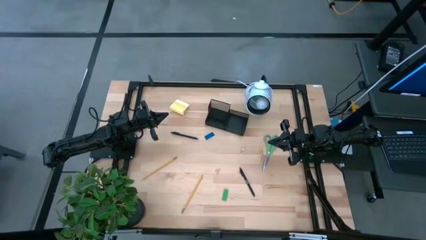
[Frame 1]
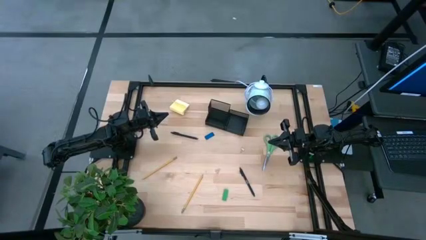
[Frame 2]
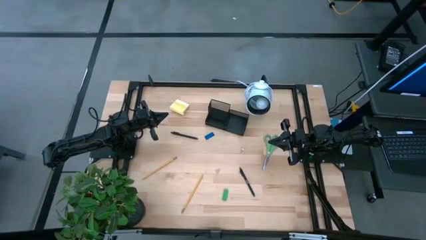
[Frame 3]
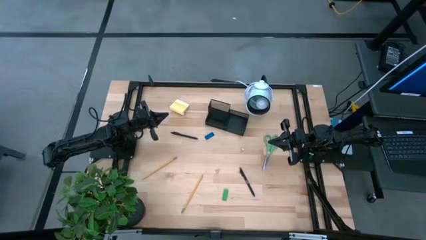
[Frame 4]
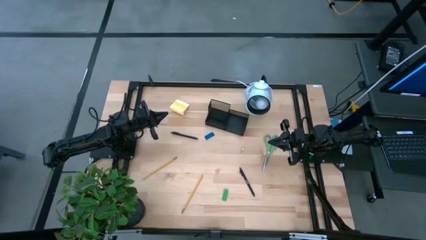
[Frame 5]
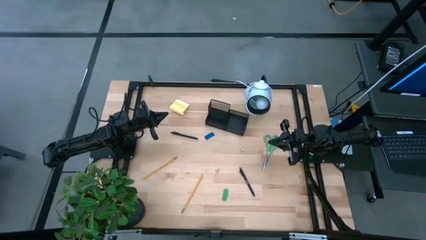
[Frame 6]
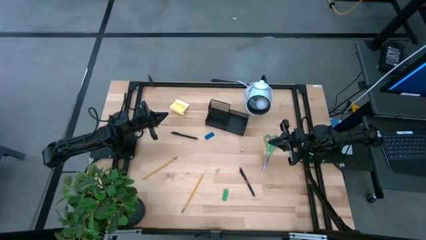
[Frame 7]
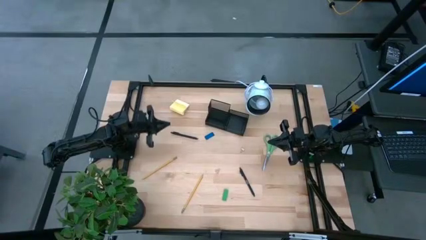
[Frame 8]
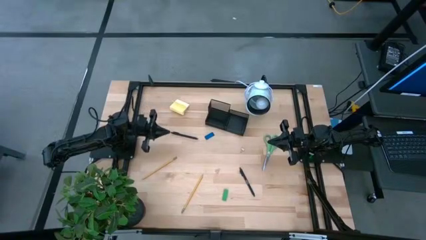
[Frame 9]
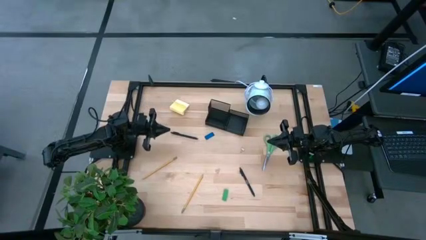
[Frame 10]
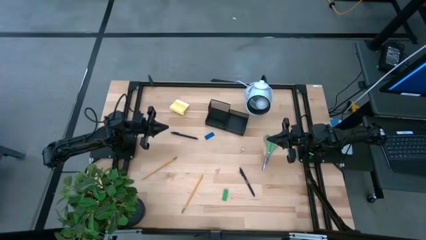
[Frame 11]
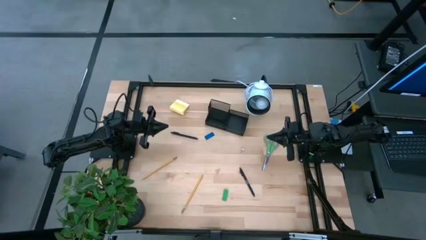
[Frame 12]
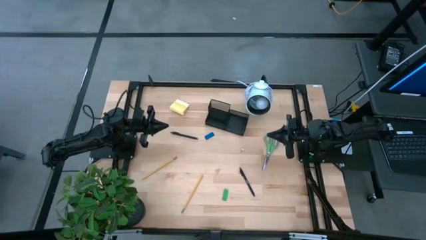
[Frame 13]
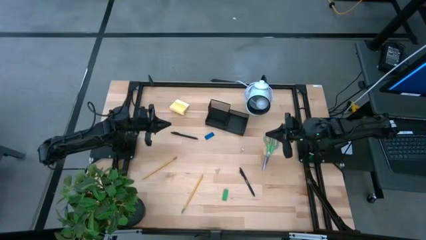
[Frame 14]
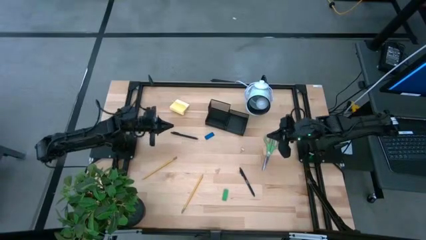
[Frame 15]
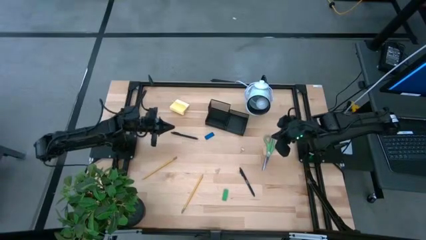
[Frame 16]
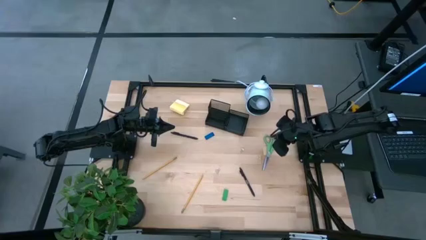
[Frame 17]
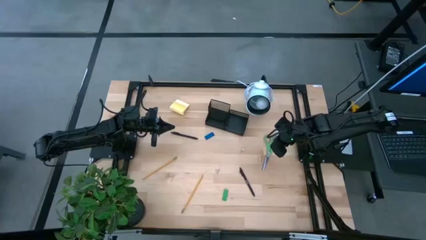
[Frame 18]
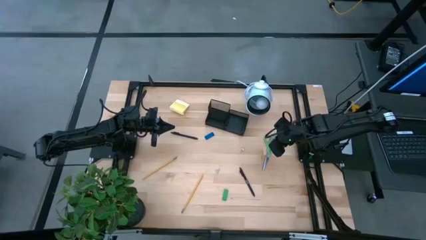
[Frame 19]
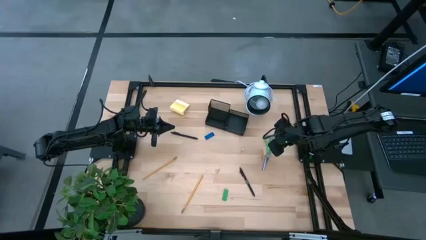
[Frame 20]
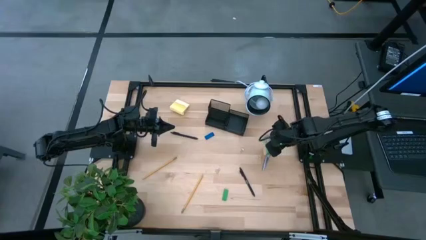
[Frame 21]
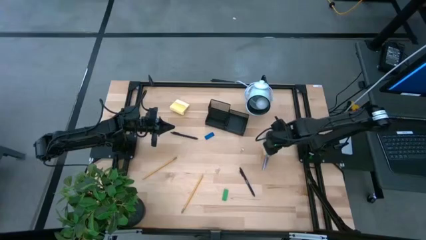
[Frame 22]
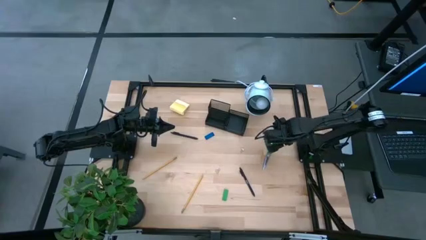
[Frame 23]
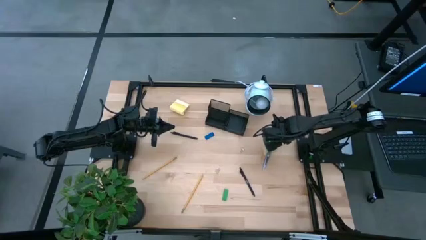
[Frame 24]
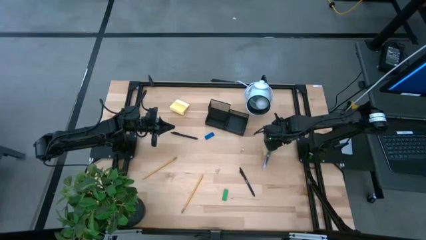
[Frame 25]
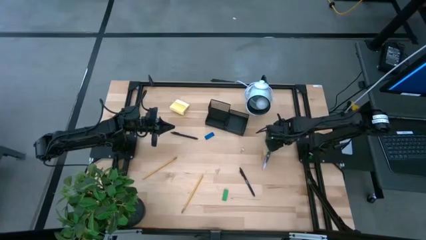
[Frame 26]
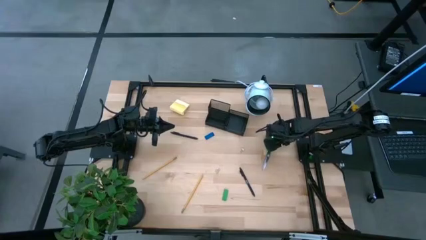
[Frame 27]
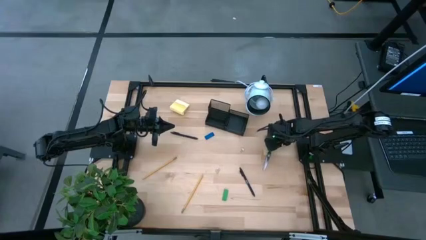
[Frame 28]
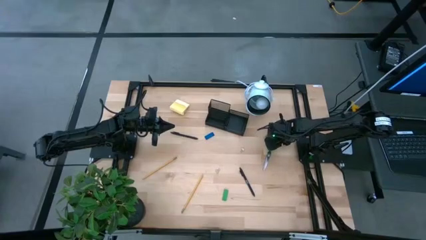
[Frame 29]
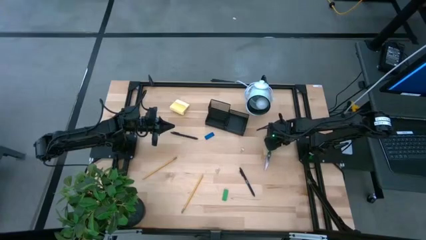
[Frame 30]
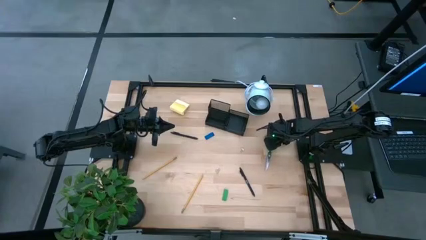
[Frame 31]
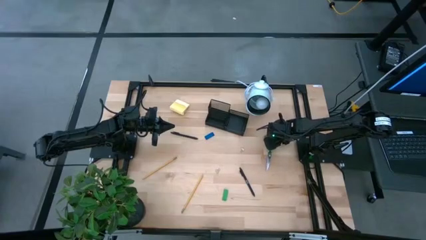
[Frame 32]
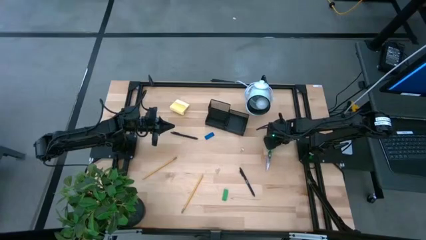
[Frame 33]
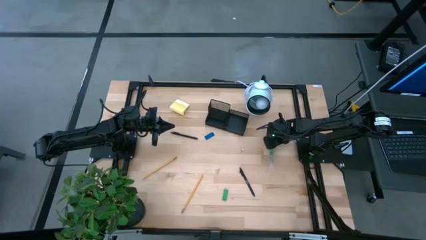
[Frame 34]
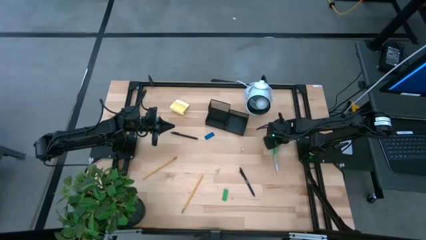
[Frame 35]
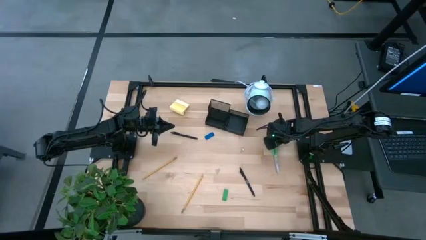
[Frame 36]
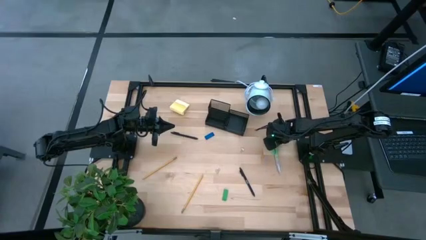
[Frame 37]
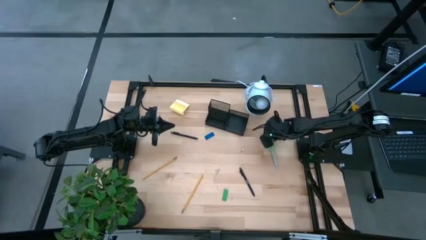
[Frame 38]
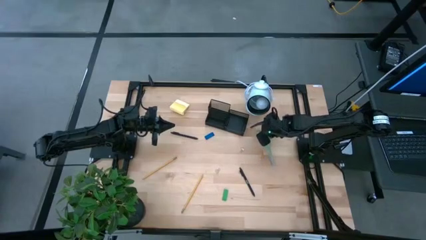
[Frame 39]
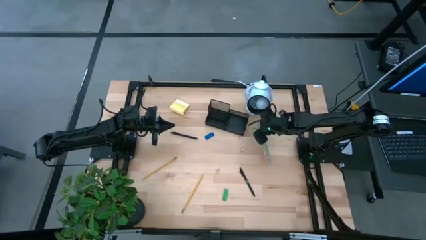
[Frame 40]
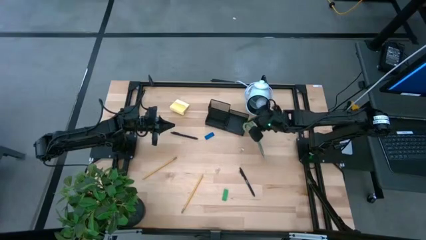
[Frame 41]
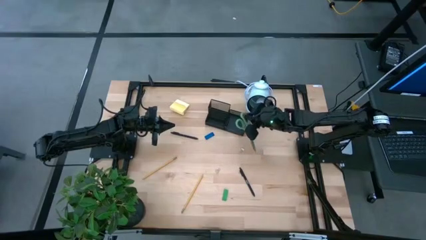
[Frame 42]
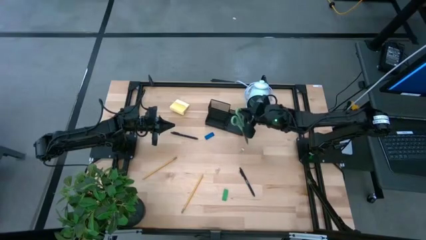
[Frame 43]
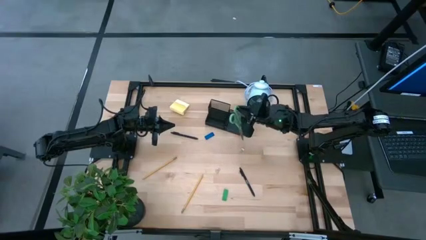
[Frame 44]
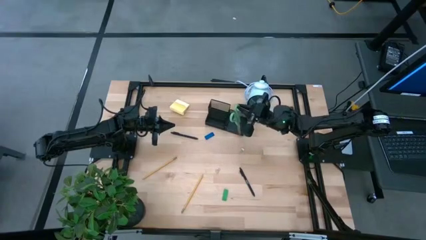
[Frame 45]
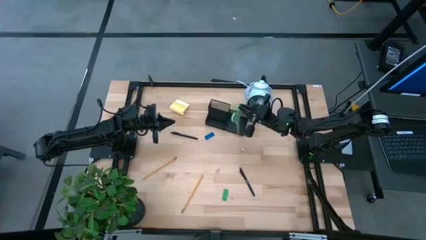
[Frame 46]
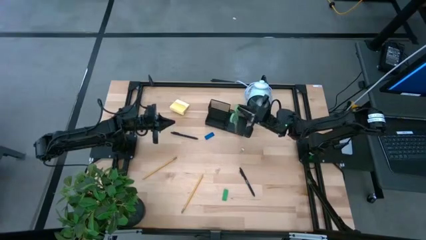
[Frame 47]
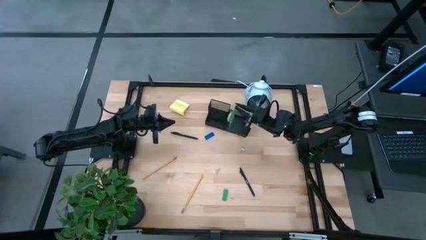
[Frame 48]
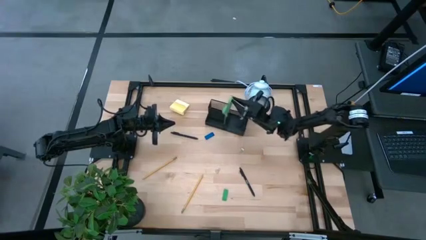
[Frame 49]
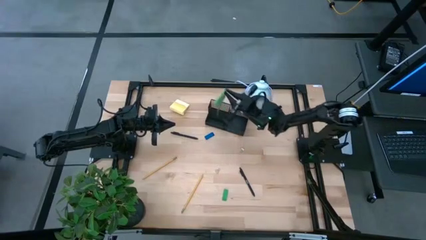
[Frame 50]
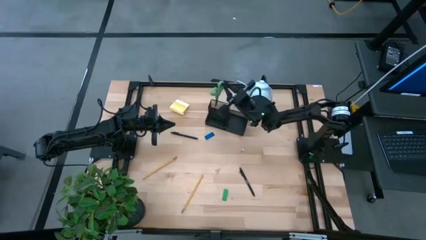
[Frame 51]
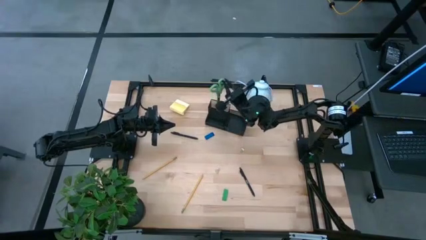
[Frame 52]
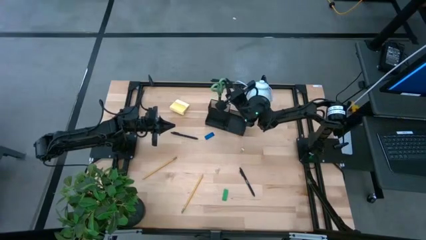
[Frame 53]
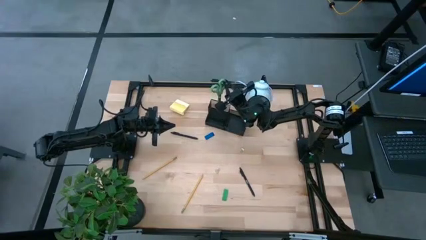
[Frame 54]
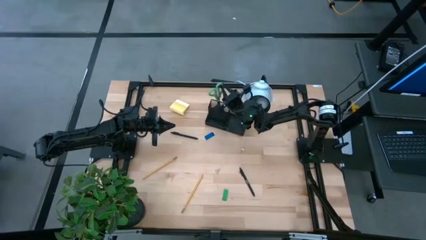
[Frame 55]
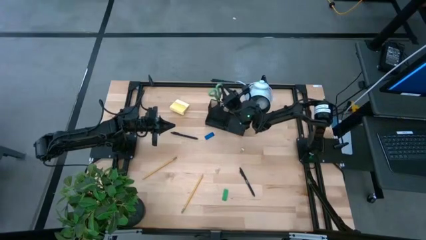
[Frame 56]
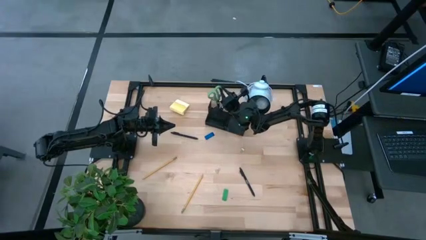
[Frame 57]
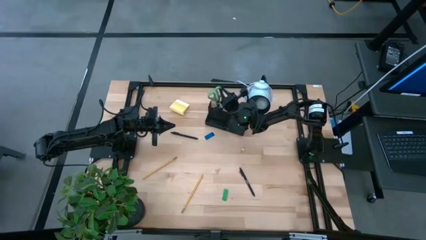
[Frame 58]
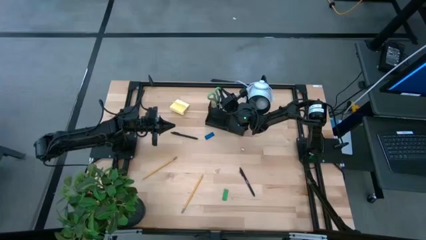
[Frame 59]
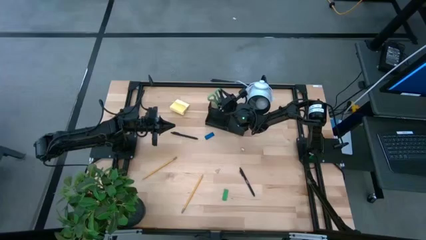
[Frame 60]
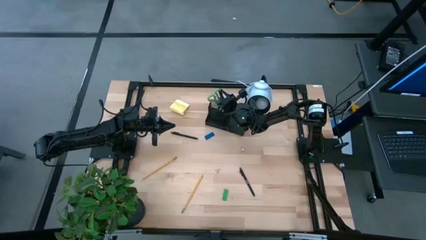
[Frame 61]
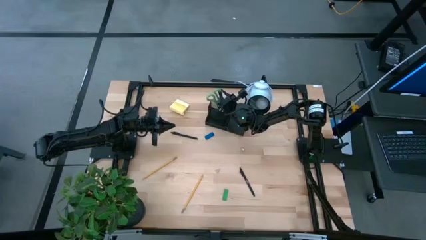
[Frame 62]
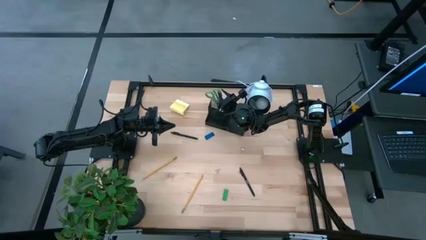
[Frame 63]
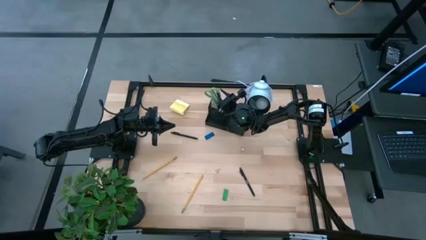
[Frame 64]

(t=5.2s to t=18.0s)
Task: Pick and place office supplies into organizer
Put the green scissors into the black desk organizer

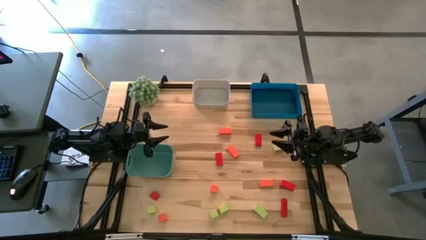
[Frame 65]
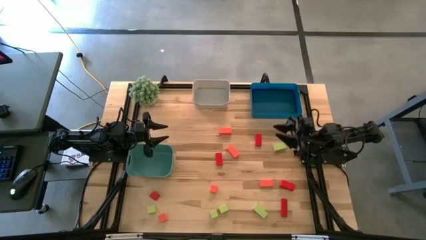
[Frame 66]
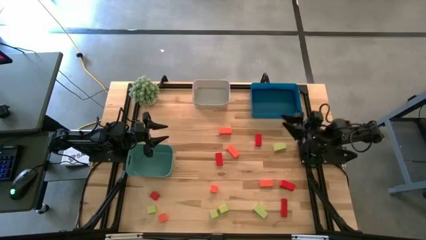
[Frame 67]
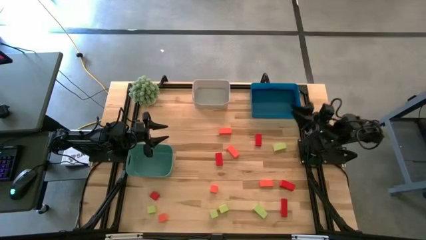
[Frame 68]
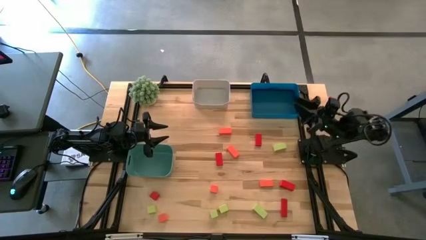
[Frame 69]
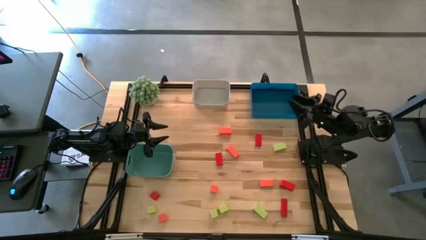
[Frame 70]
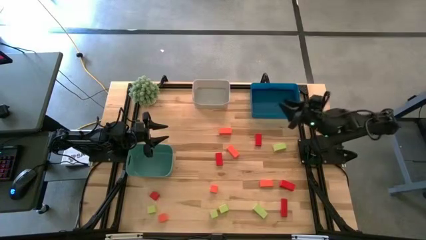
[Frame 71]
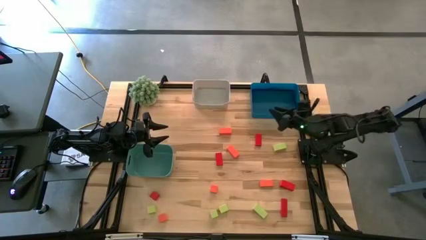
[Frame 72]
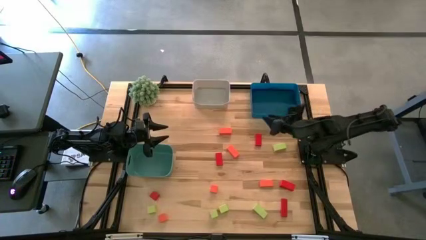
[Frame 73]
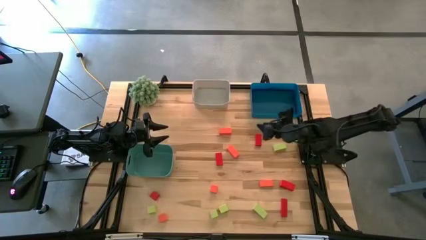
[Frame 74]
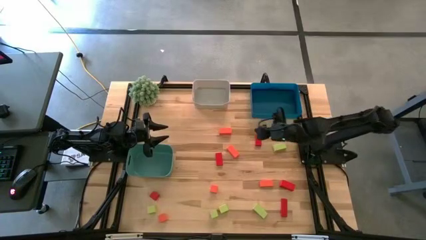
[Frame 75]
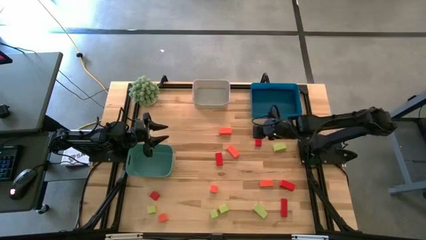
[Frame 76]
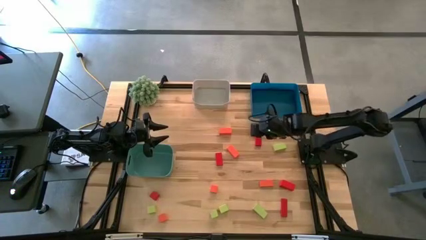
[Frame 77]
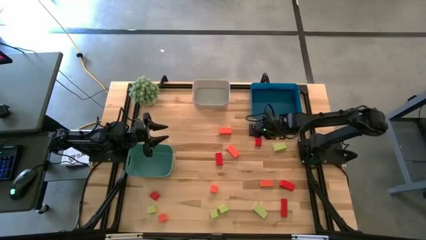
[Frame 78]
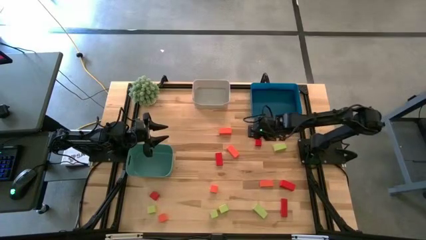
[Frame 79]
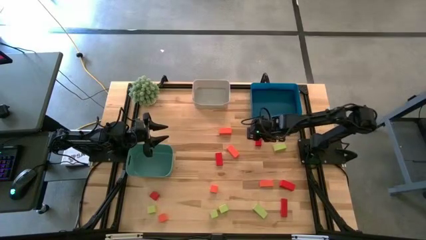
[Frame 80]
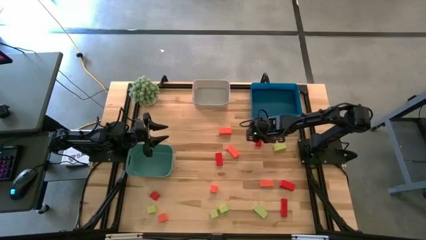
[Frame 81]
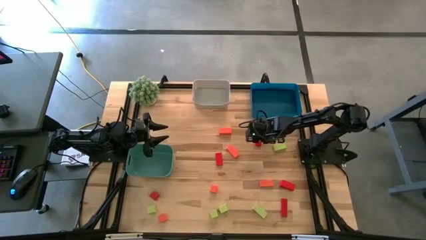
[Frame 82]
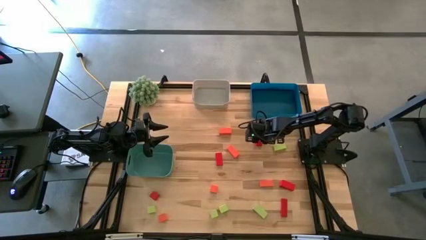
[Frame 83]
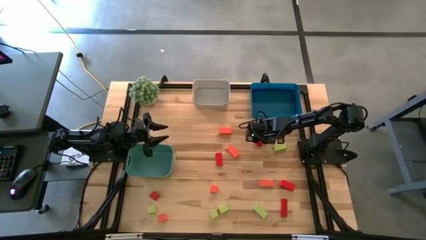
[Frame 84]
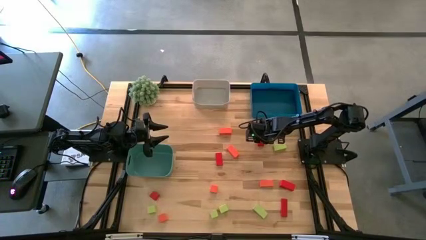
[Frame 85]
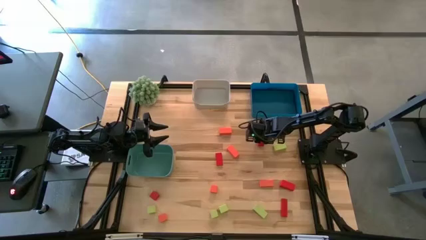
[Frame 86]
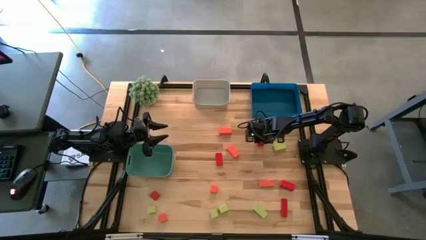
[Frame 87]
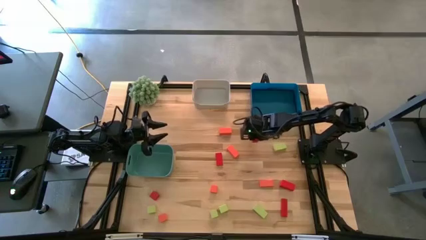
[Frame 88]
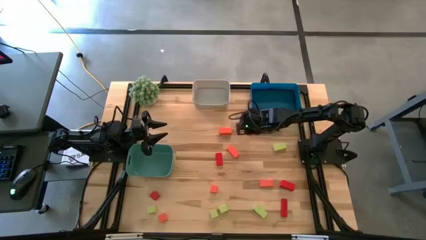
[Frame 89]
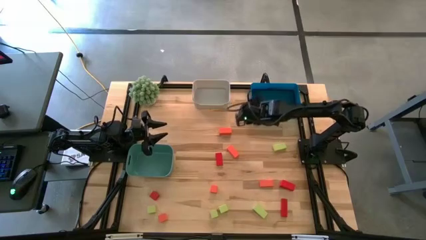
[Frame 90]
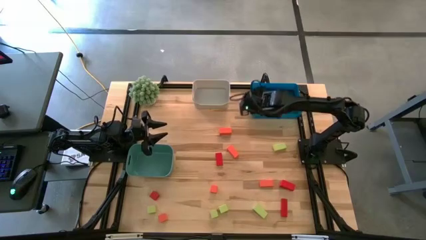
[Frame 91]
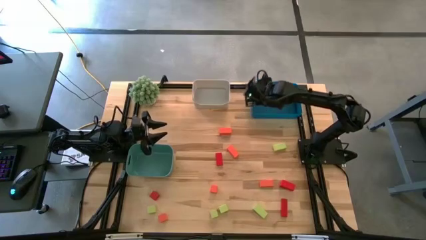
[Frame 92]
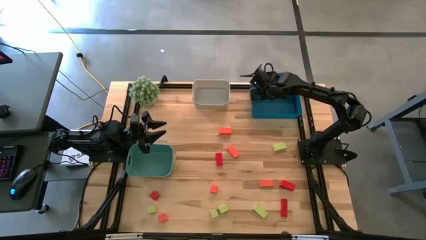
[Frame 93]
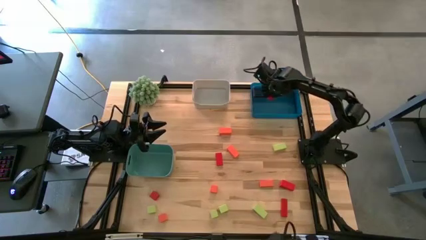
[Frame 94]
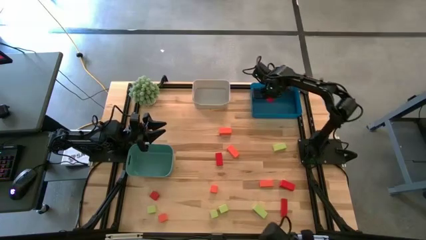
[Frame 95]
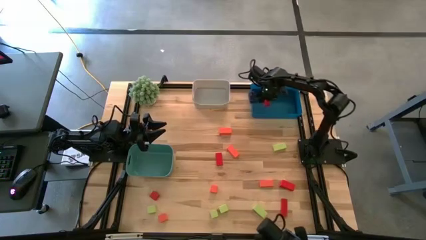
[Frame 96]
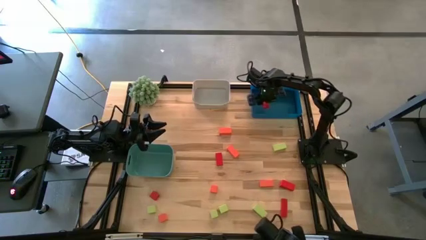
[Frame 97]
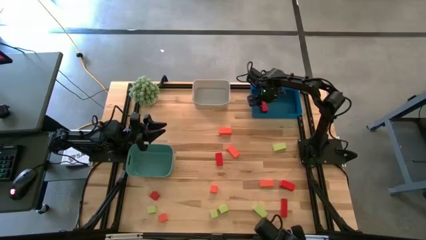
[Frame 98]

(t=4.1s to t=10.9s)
Task: Sort & place blocks by color
Put the red block into the blue bin
